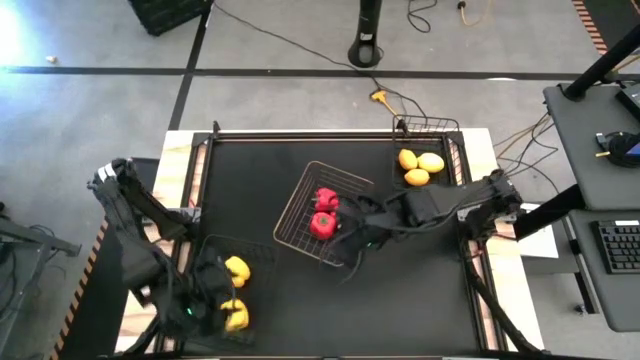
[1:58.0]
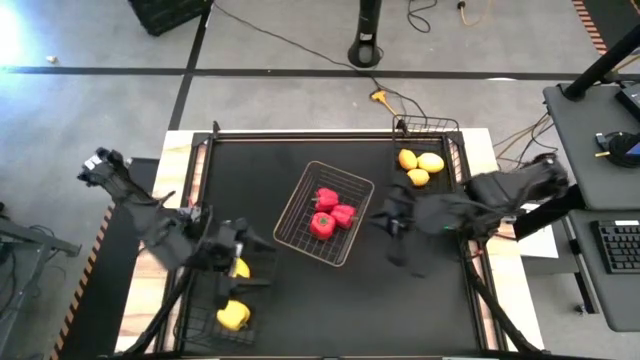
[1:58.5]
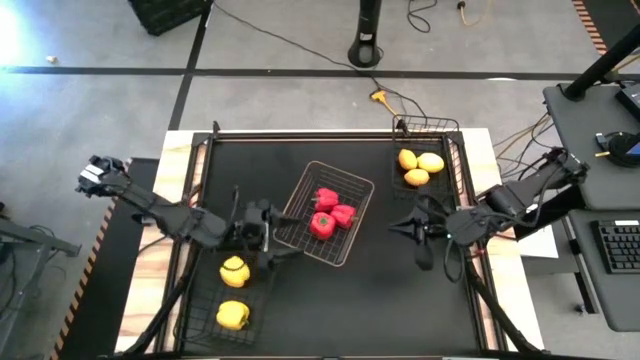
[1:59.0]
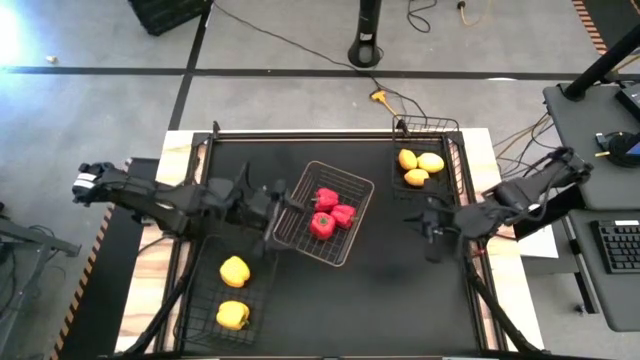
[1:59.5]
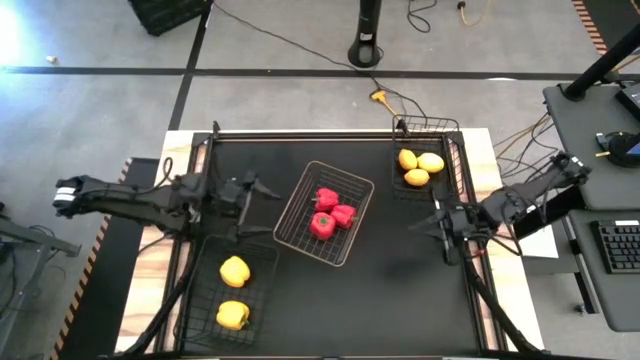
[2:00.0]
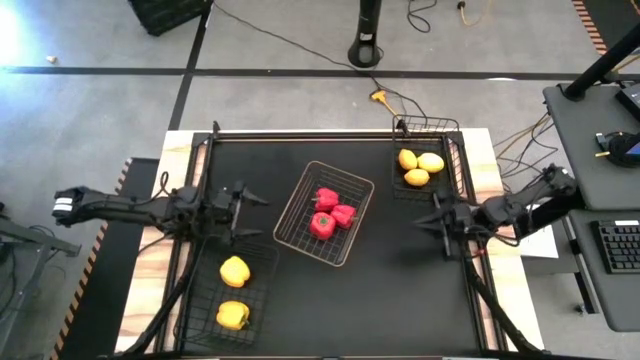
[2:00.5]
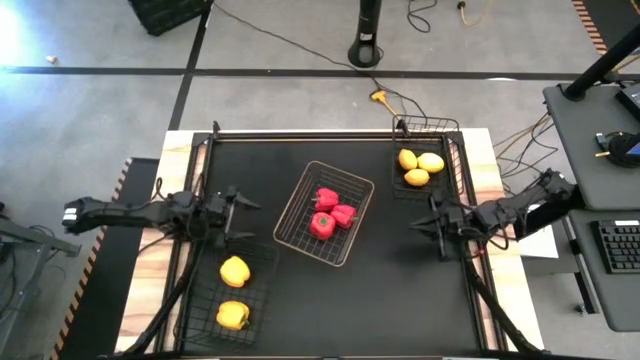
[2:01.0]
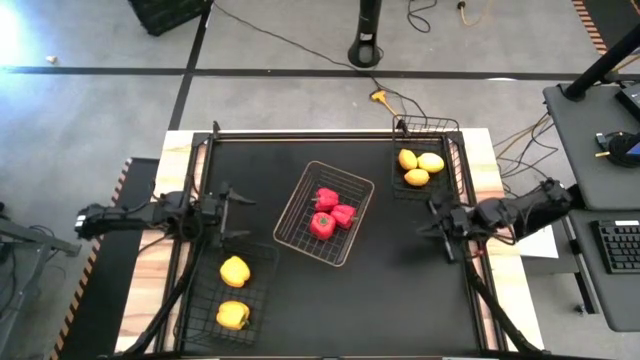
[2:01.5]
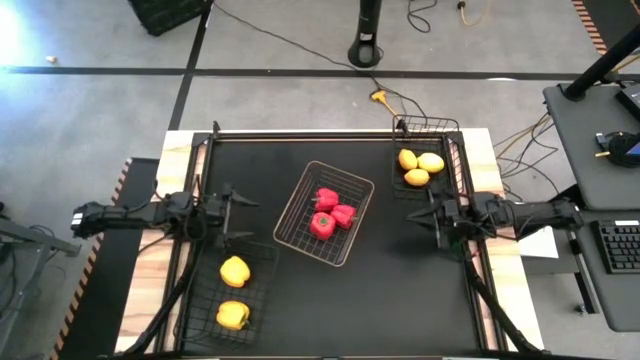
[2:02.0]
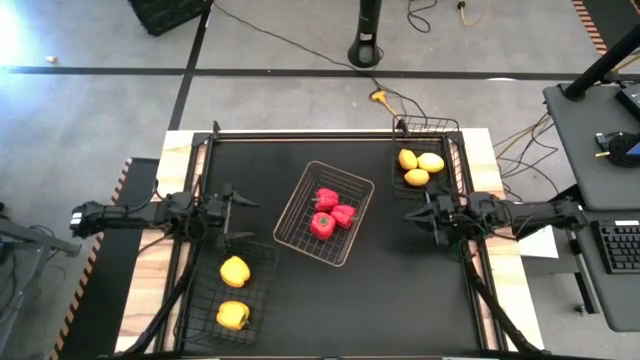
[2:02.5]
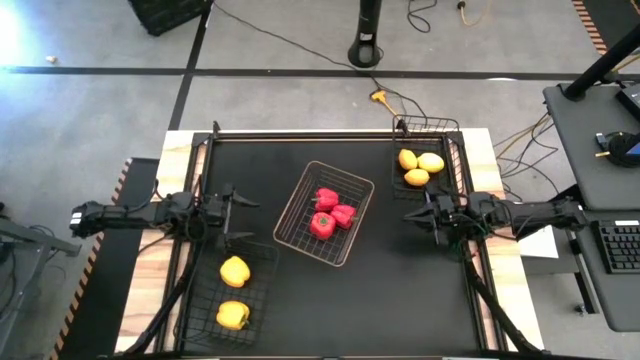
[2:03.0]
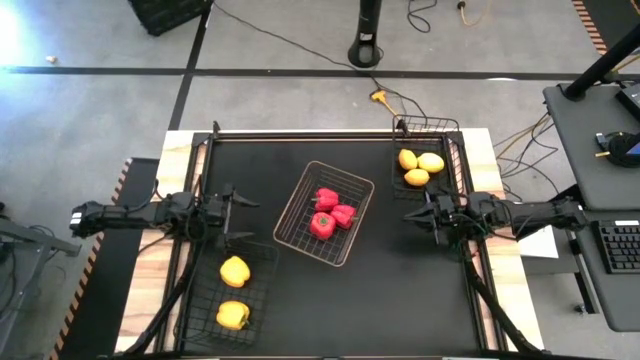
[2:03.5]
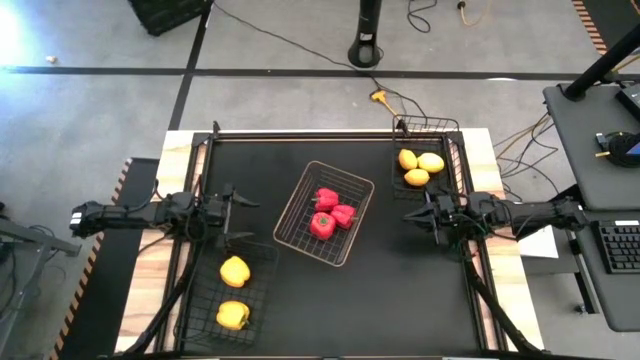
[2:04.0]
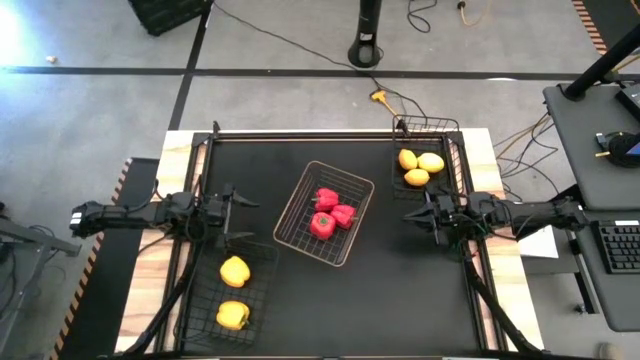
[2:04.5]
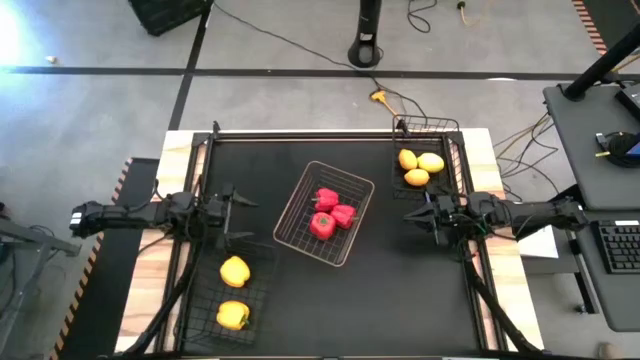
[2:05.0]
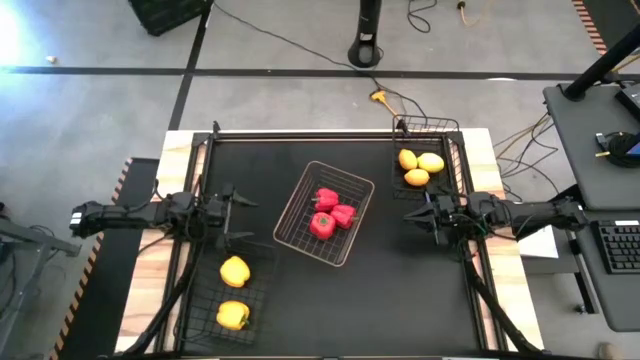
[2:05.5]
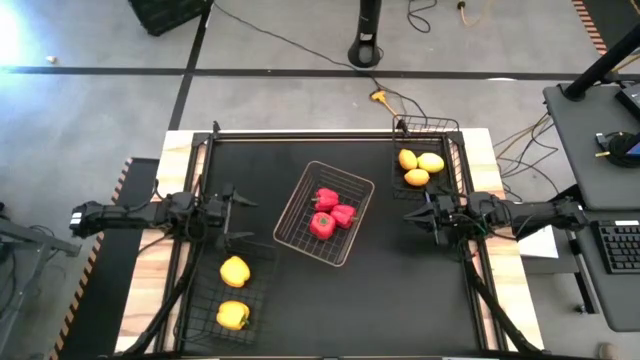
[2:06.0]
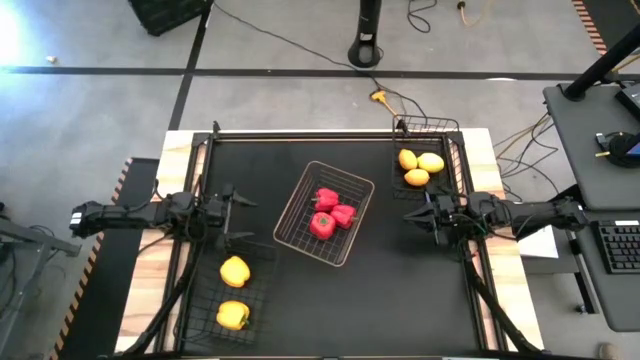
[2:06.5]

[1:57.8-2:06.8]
Task: Sort produce into baskets
Return to Home Position

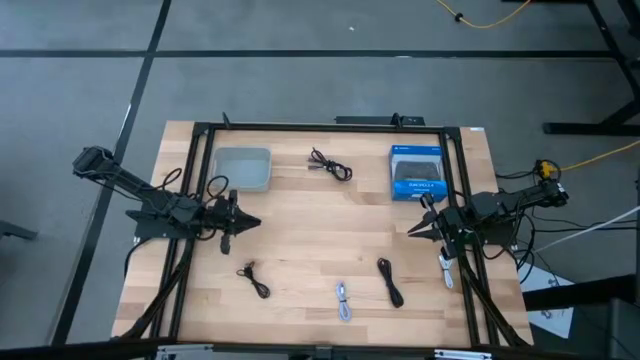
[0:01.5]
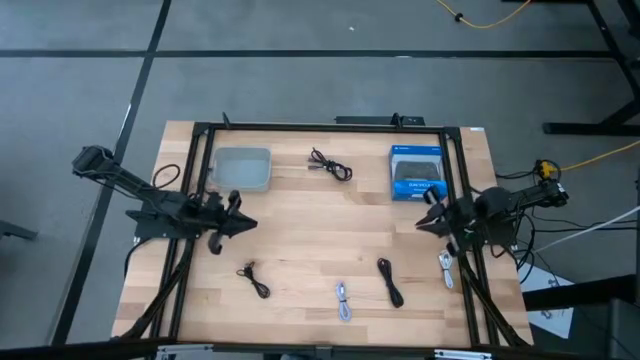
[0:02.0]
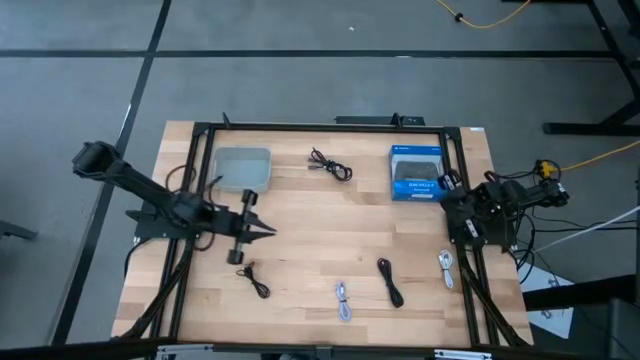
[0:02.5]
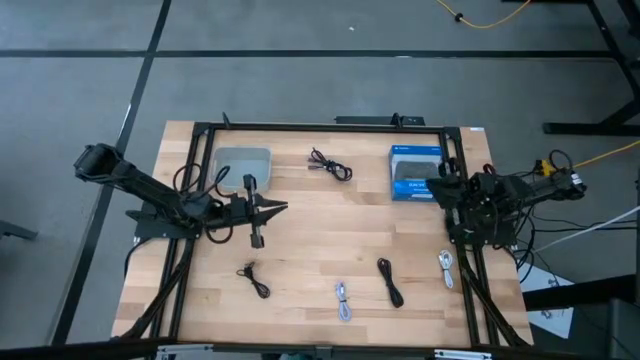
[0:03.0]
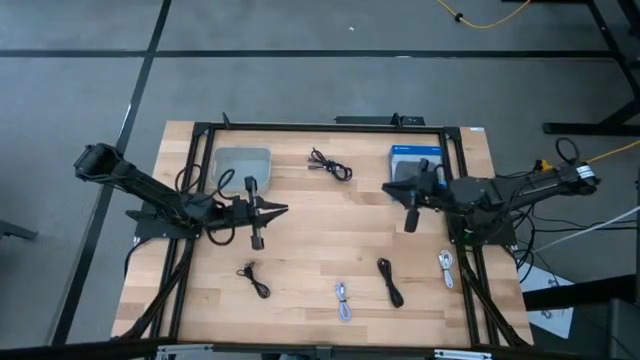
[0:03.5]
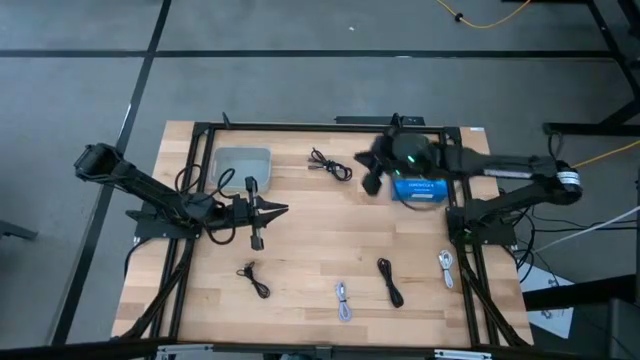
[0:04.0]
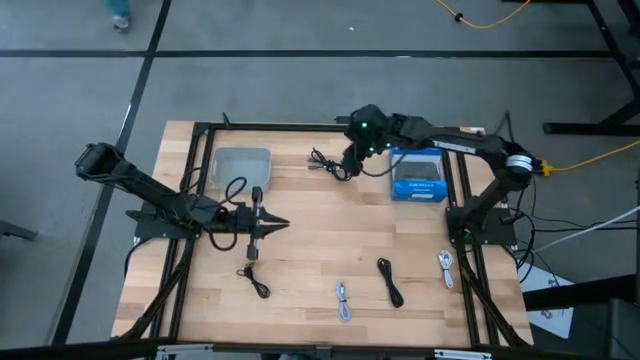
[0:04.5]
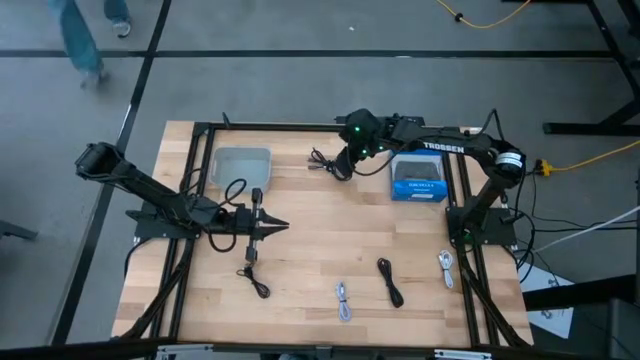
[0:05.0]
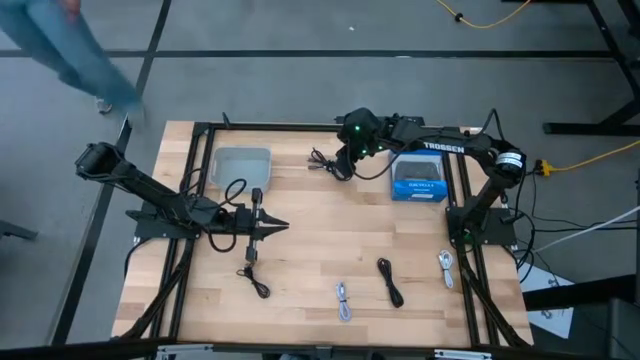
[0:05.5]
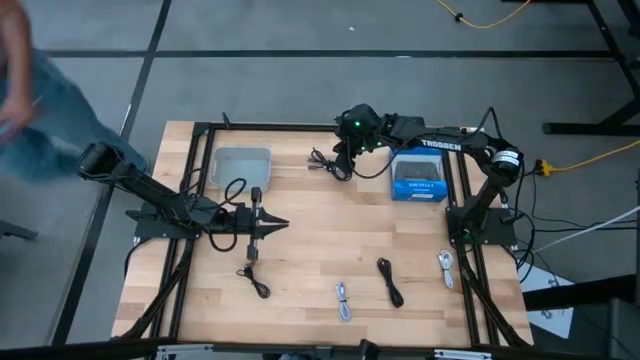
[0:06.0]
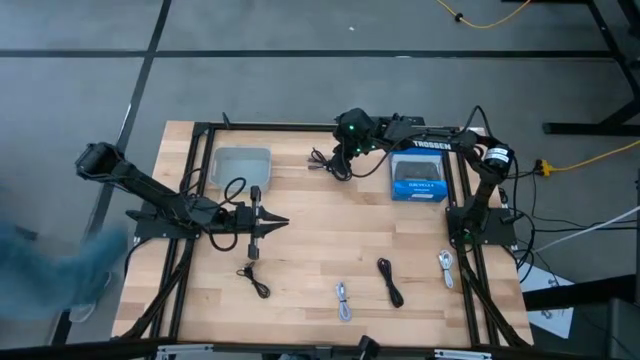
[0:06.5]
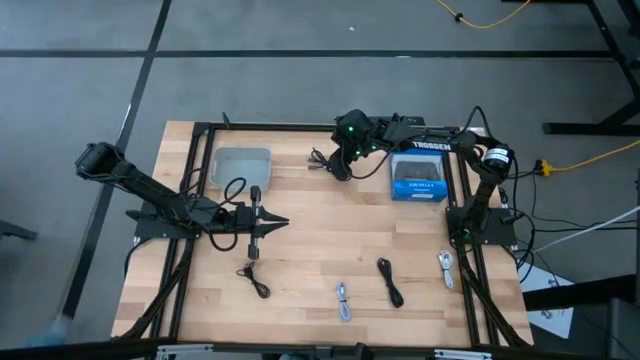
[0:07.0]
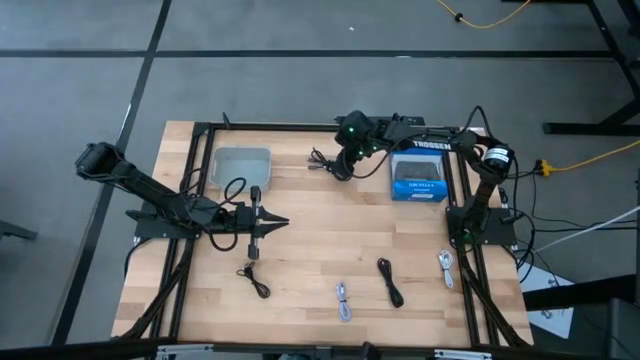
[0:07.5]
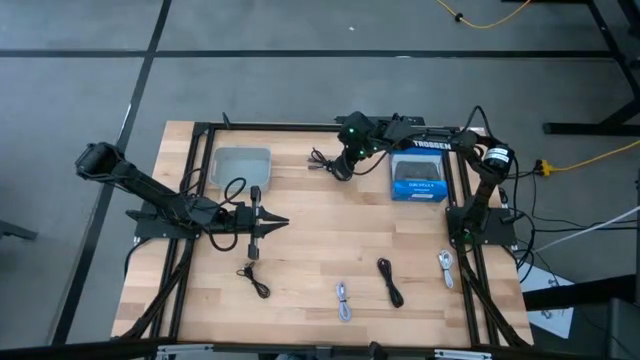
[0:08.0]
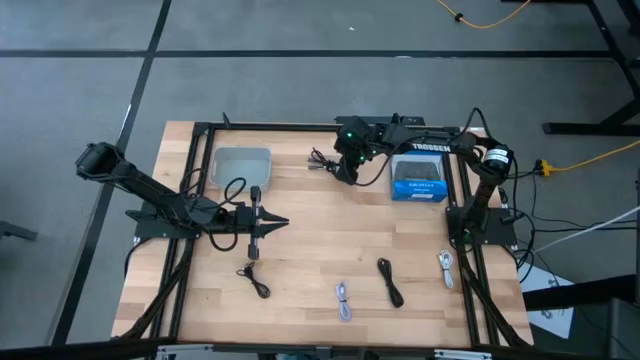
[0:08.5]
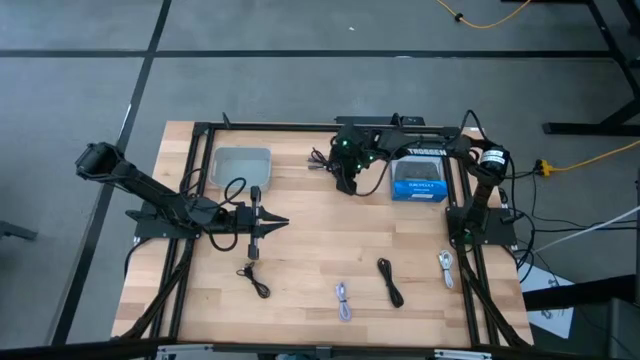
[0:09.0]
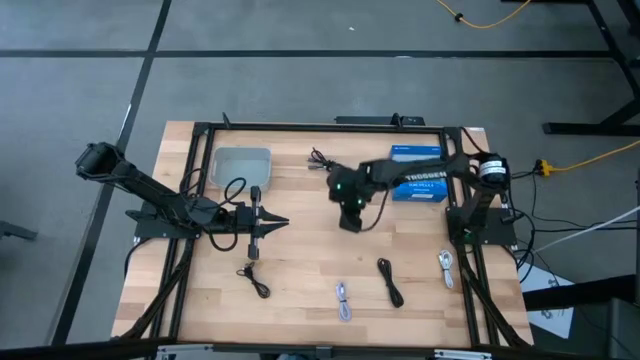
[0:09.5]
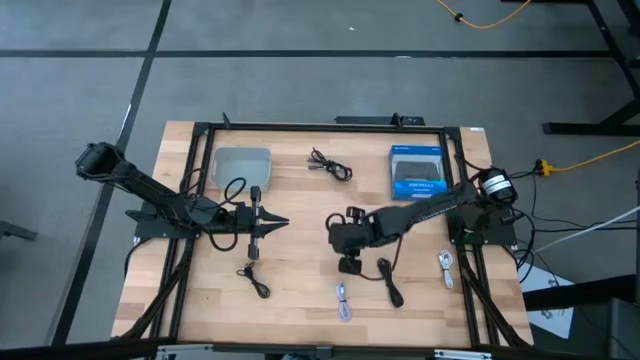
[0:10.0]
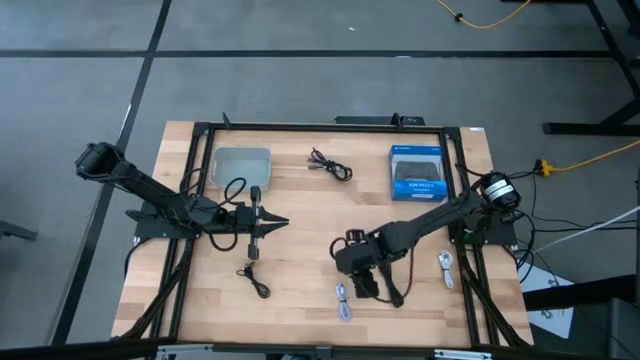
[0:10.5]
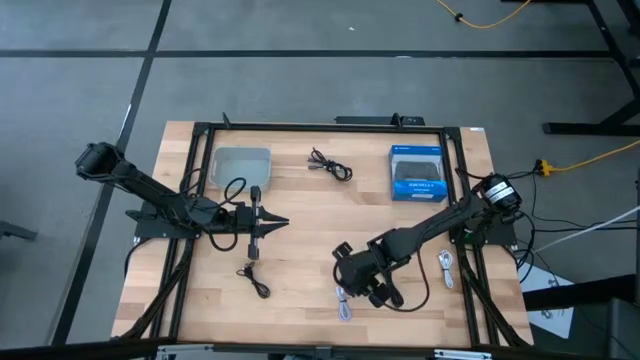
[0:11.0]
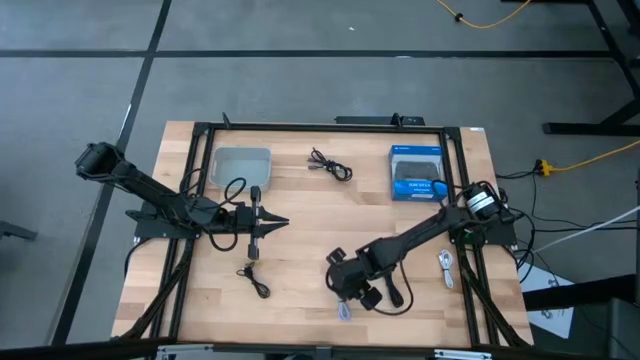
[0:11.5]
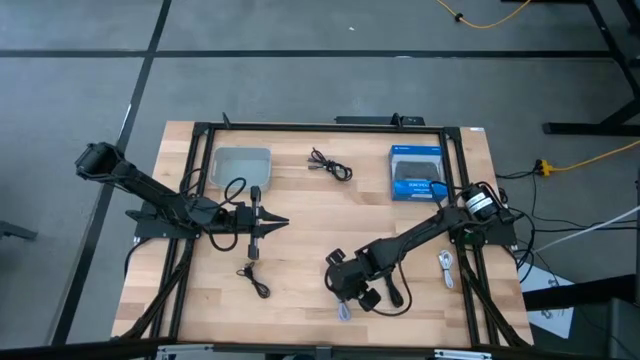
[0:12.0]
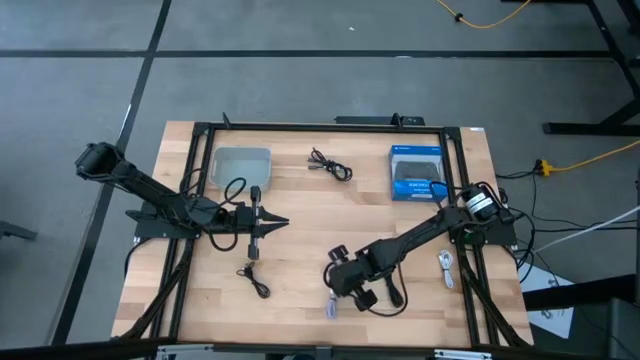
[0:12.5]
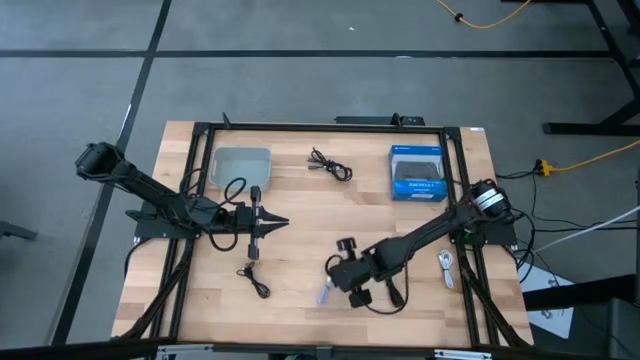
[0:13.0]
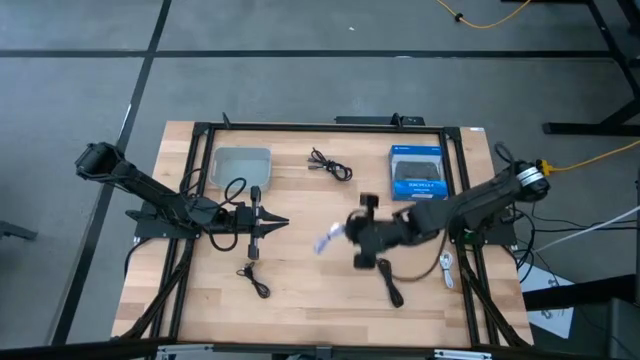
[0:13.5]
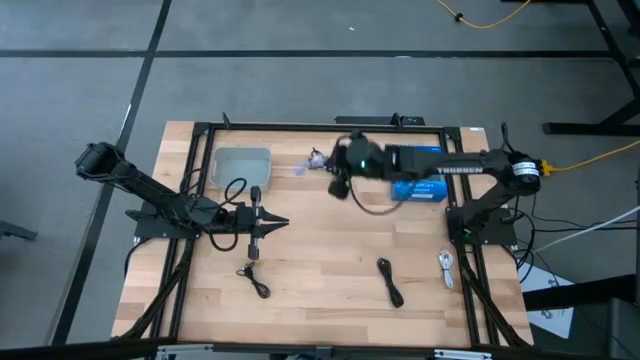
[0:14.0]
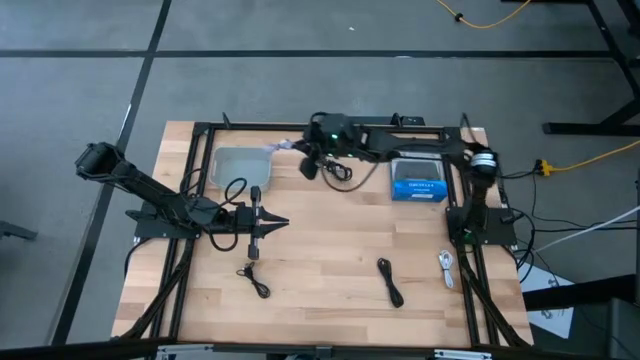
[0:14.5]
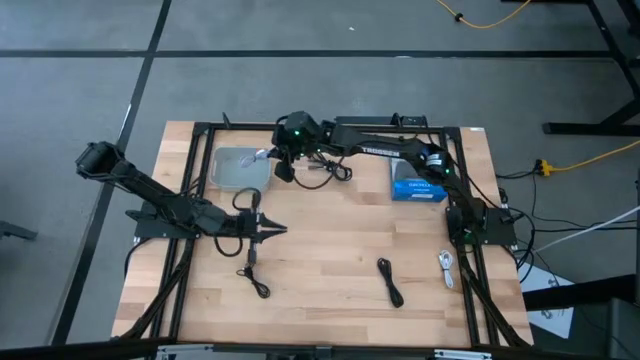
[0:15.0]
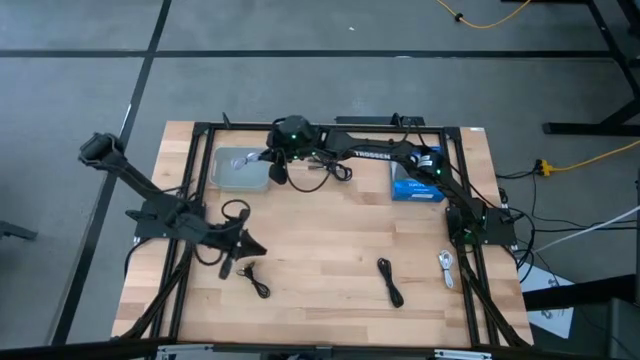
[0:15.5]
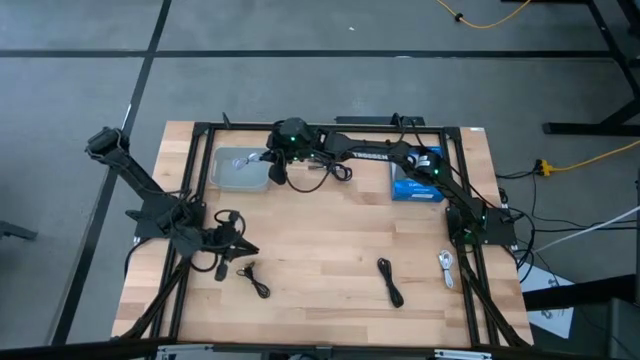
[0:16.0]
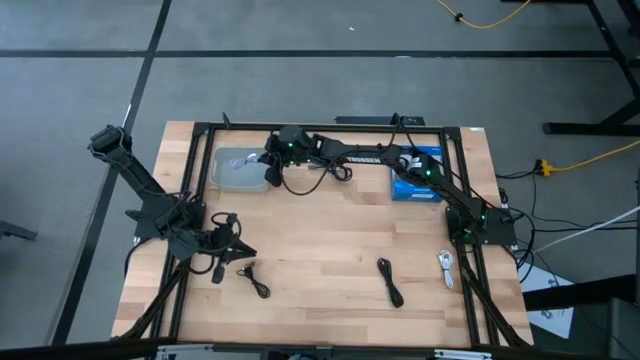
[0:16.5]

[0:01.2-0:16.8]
Task: Pick and place USB-C Cables
Put the gray charger cable into the gray bin
